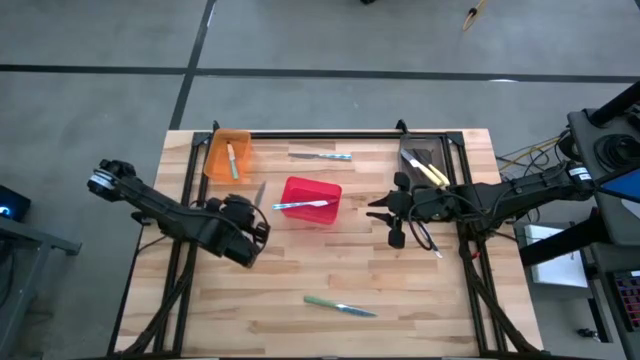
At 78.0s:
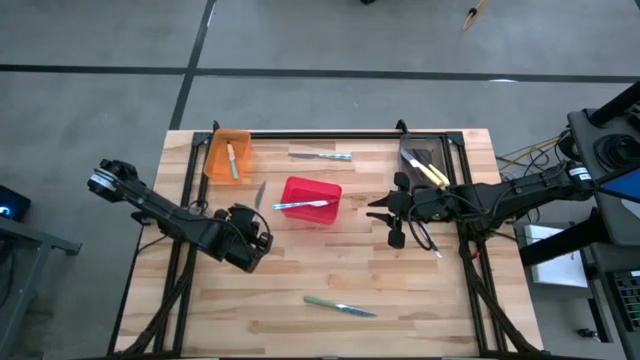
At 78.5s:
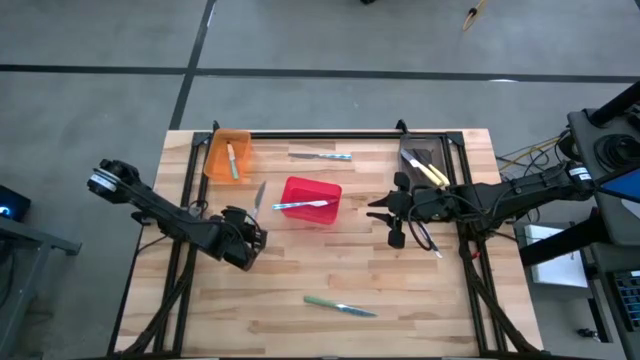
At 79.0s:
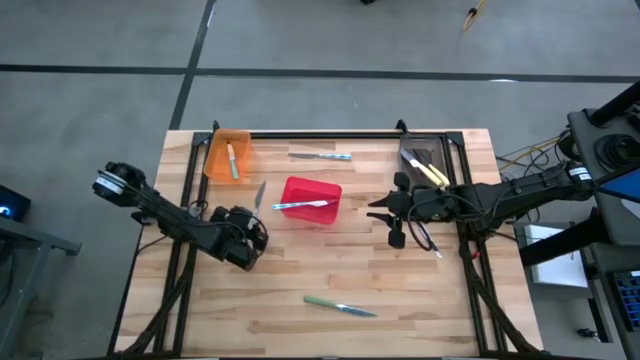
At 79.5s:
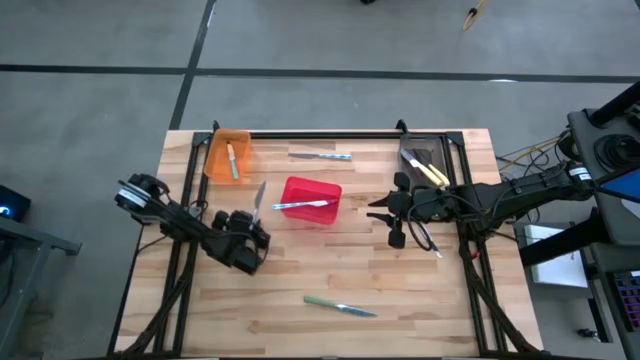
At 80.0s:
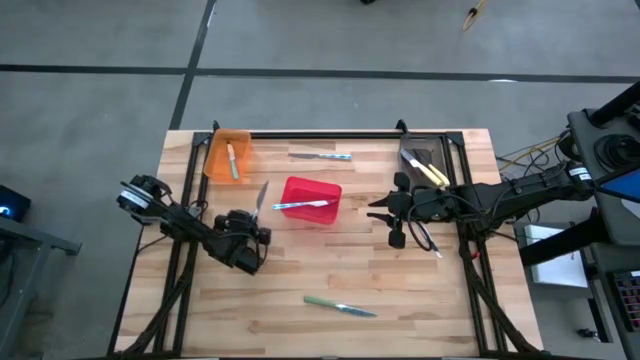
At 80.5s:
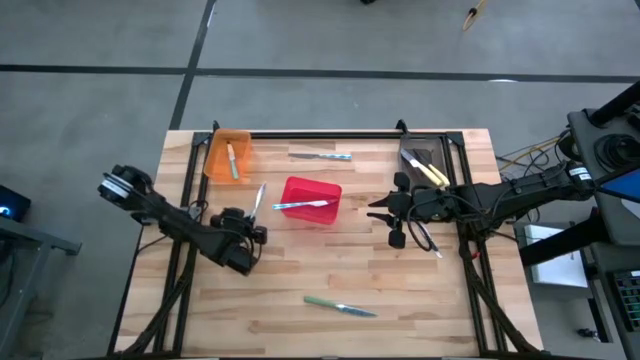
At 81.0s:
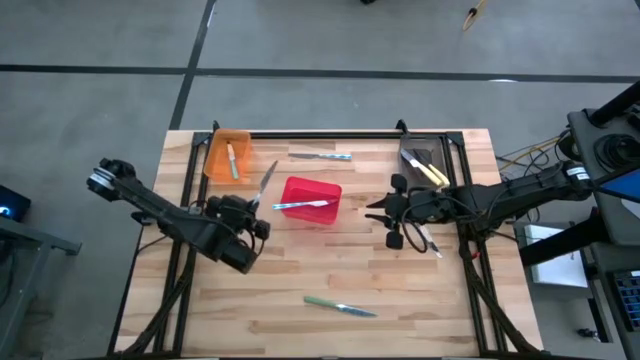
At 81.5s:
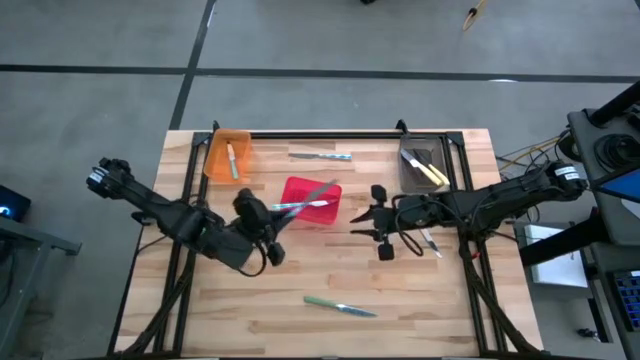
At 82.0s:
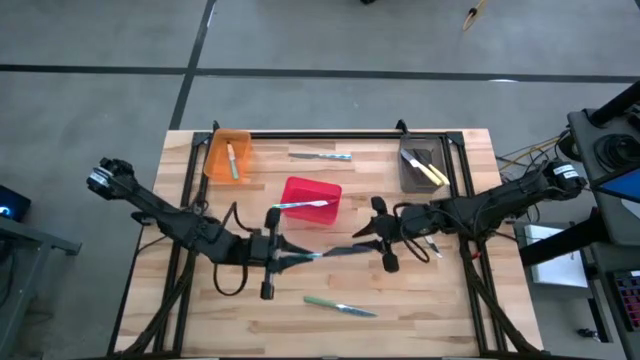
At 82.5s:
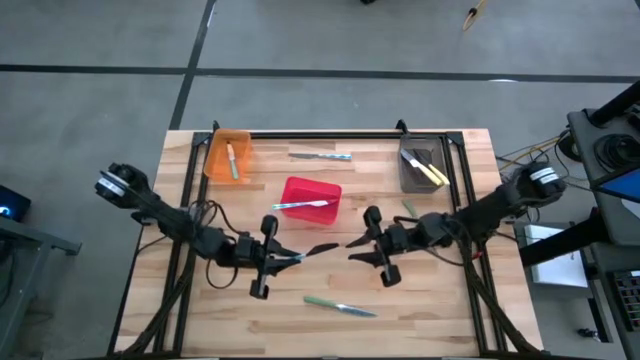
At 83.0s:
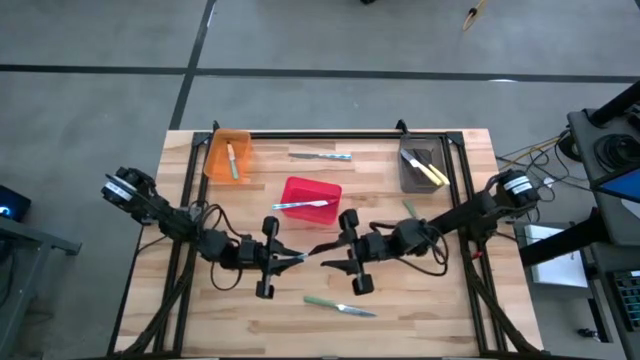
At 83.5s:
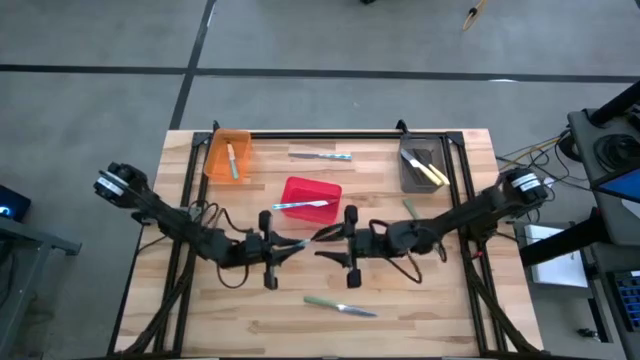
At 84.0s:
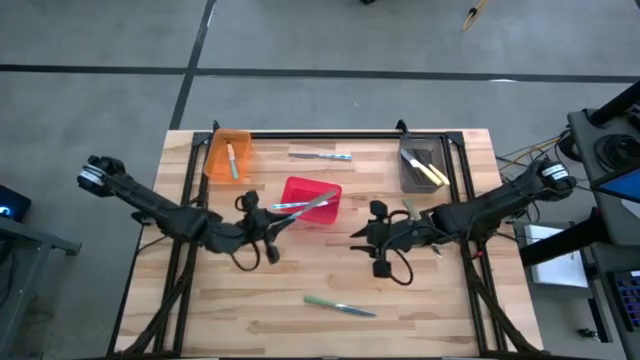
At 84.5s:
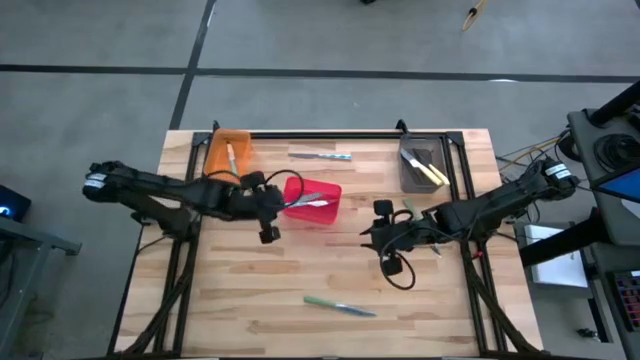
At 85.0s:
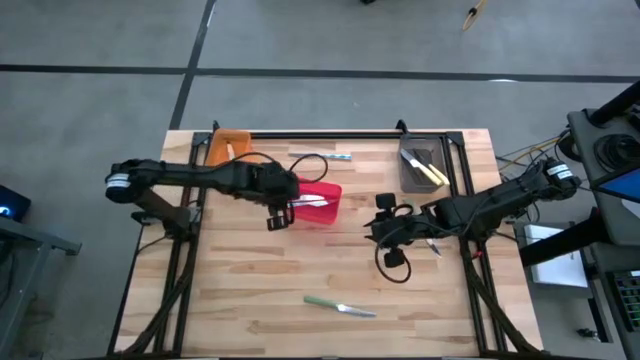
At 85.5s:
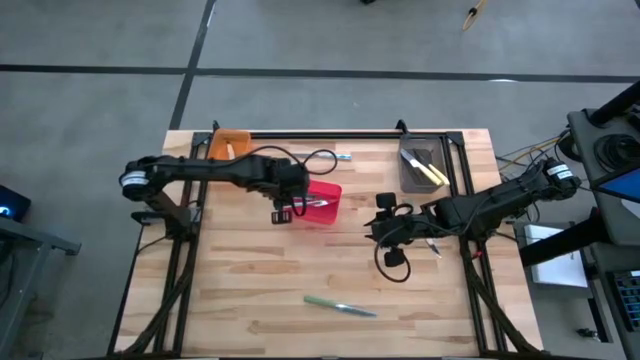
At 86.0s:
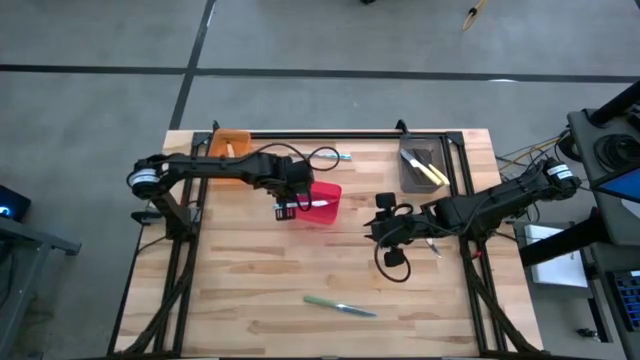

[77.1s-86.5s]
Task: Sort silverware by color (type)
Put the bottom white patterned table knife into the red bin

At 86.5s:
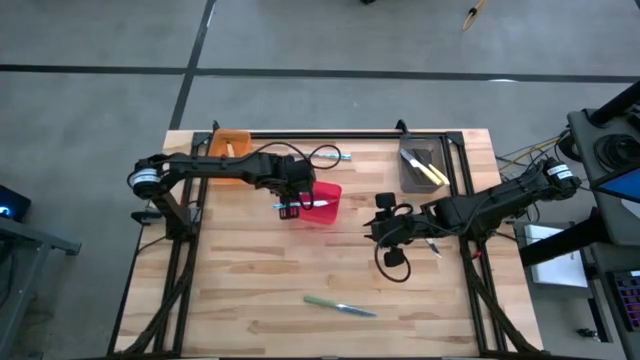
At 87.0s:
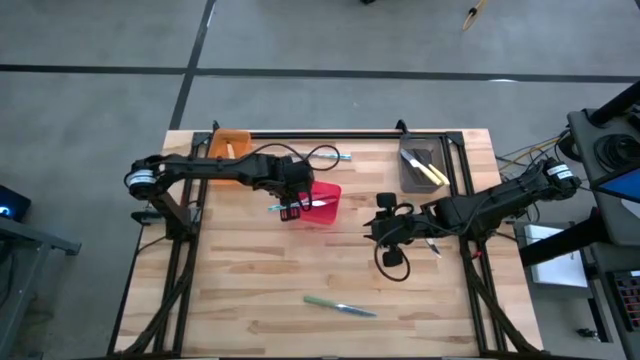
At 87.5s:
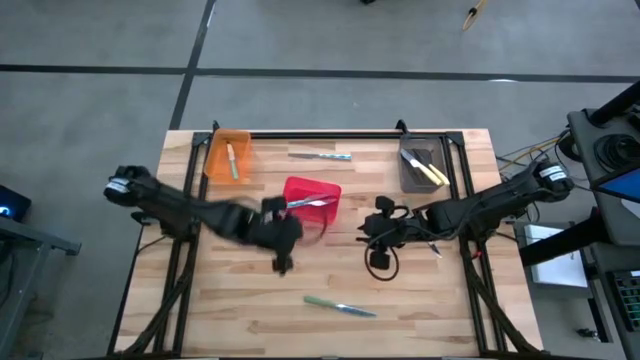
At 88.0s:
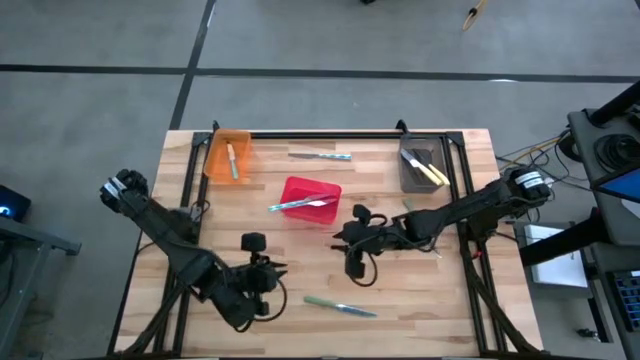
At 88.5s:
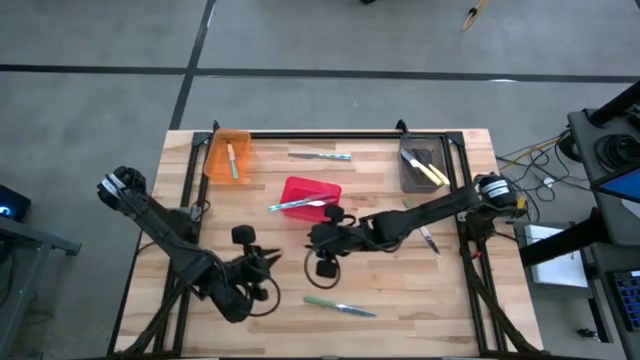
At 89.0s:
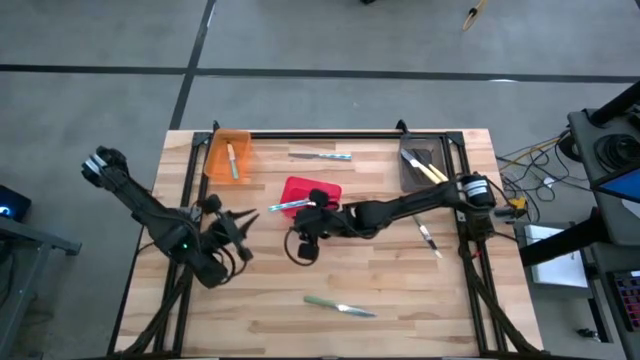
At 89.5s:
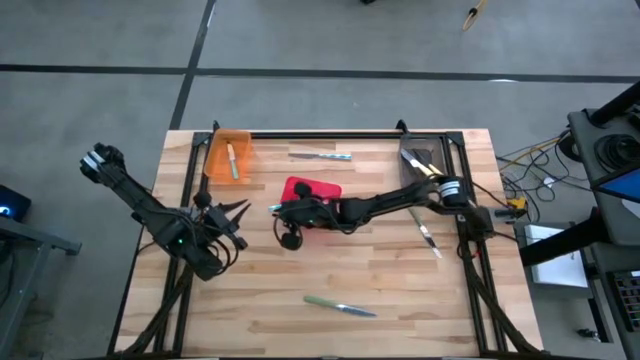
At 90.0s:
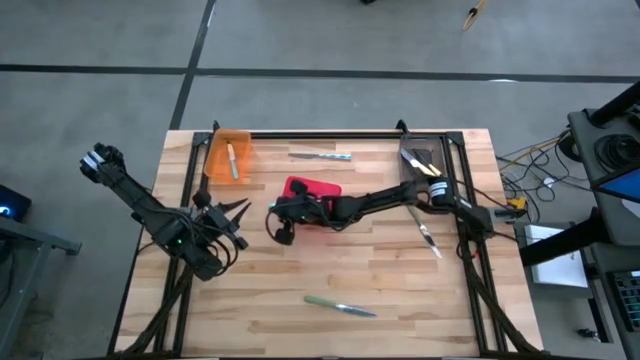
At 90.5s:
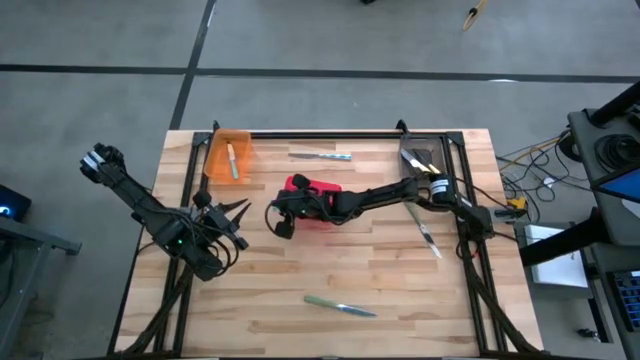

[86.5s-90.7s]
Adjust the white patterned table knife in the red bin

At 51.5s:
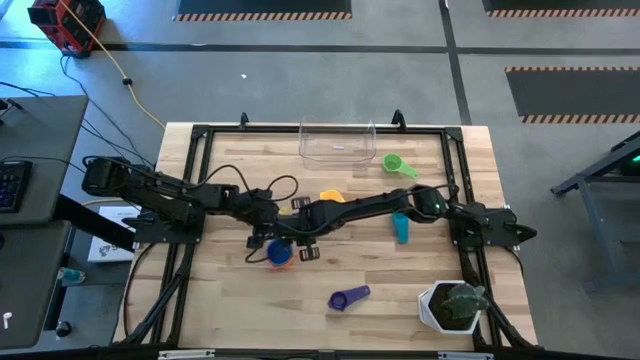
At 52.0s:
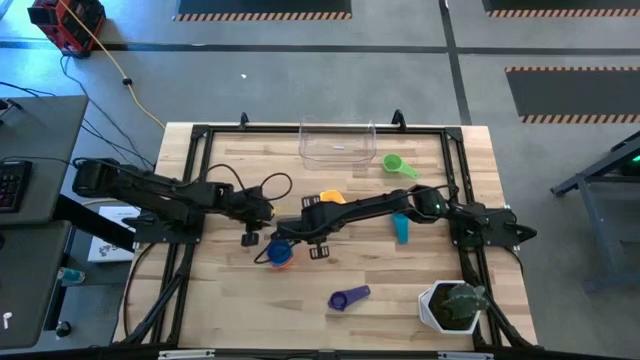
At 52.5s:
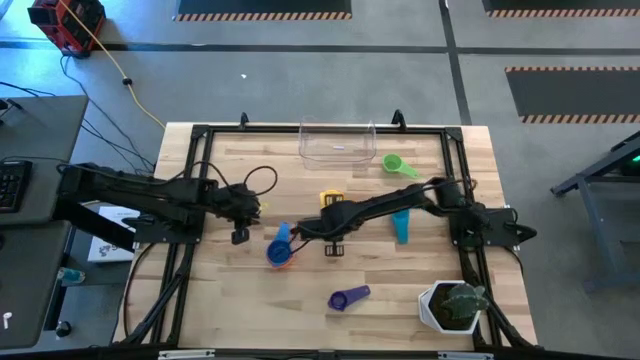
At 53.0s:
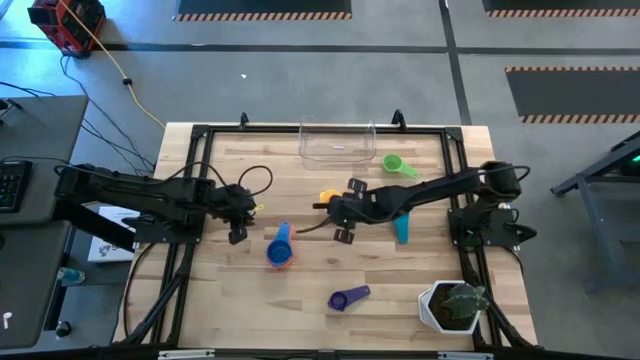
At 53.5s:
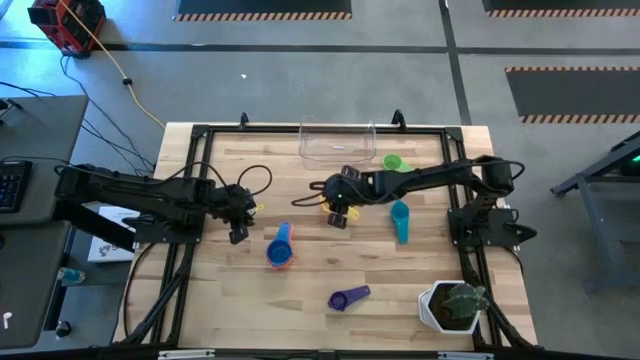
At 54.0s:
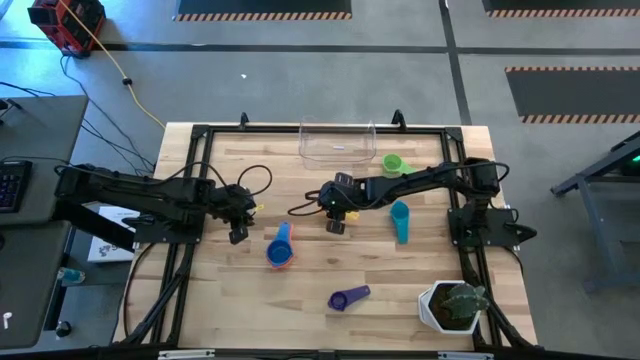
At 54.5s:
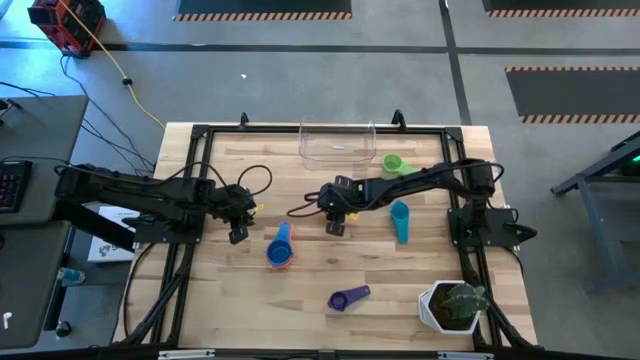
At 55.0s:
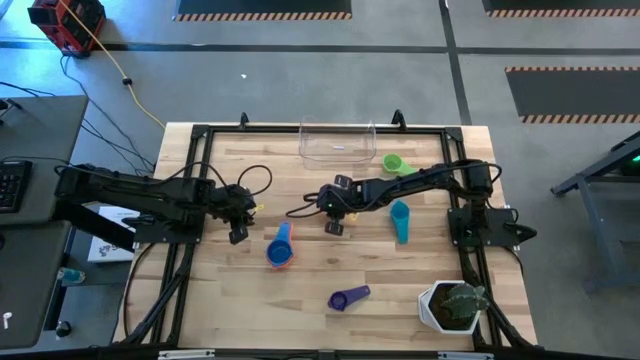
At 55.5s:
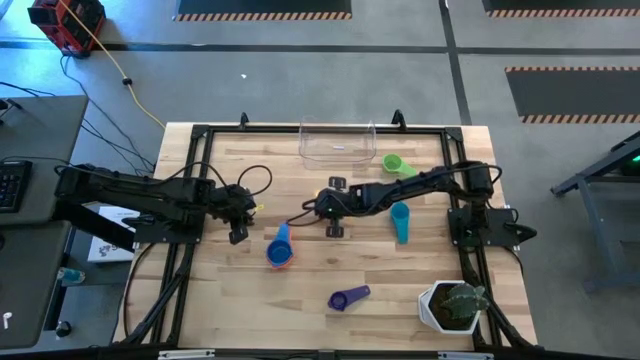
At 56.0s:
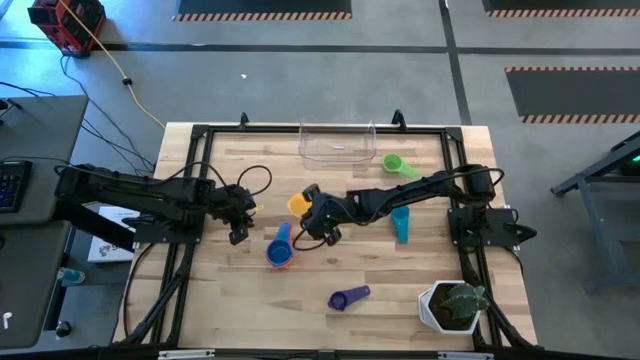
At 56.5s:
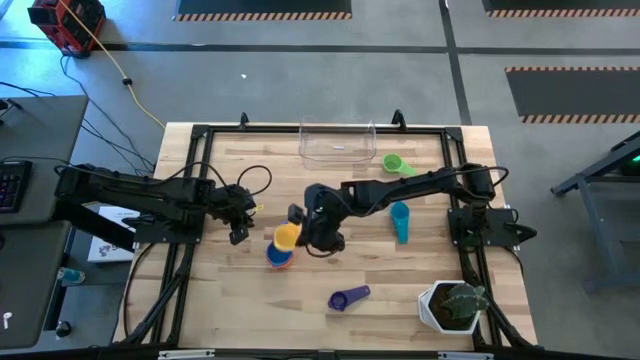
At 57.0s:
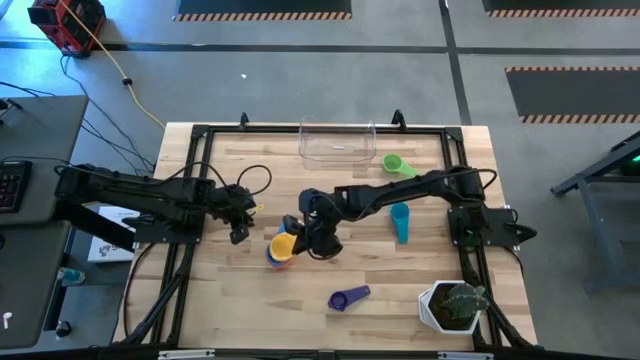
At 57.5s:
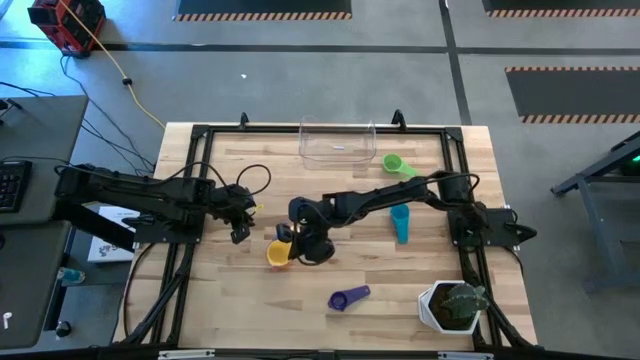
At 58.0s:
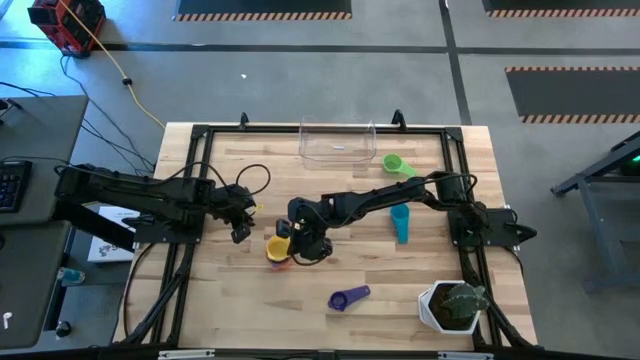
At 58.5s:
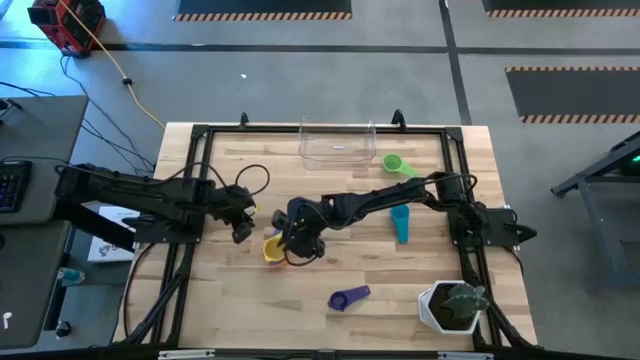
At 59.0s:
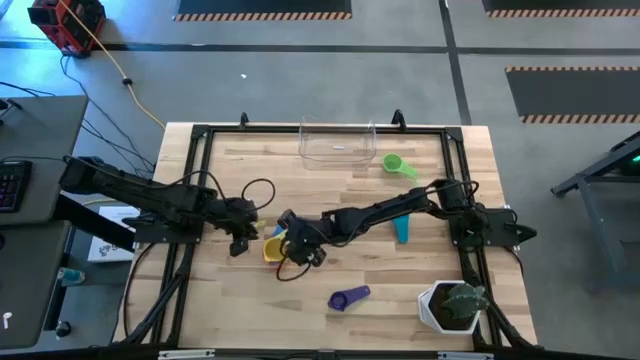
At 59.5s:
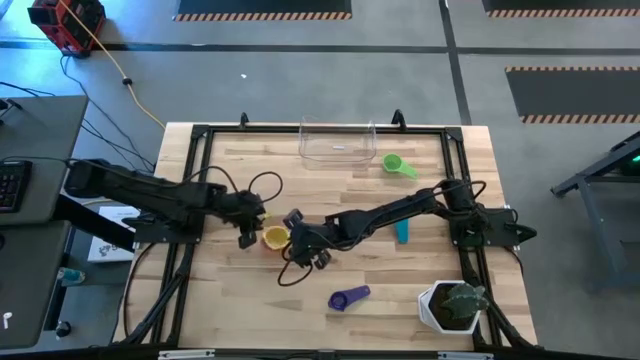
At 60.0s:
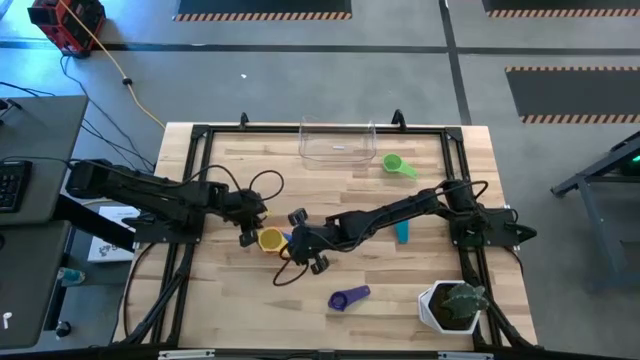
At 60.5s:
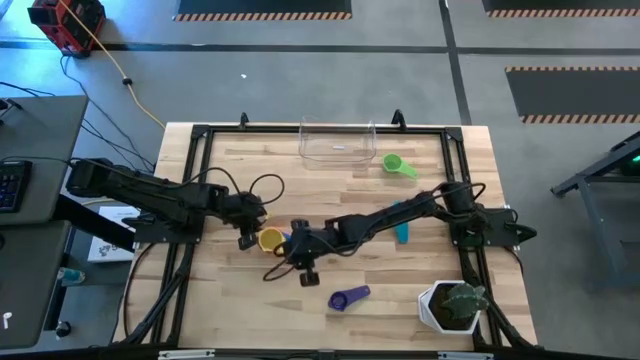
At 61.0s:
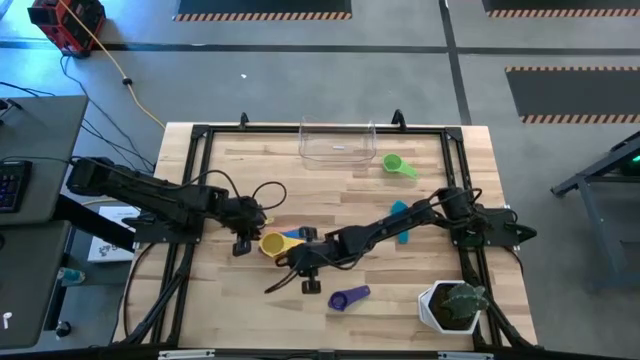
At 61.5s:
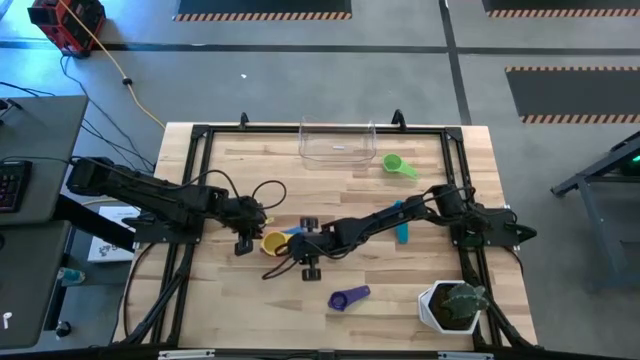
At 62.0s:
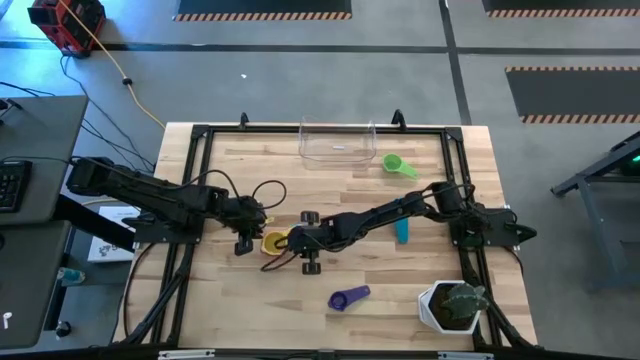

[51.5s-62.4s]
Task: Nest measuring cups in basket
Stack the yellow measuring cup into the light blue measuring cup
